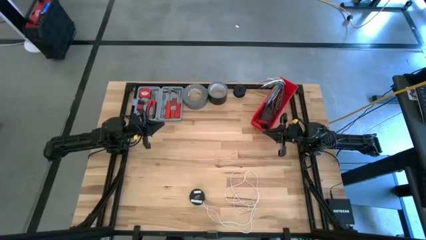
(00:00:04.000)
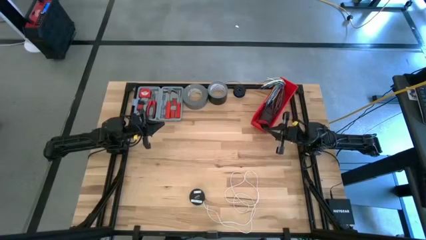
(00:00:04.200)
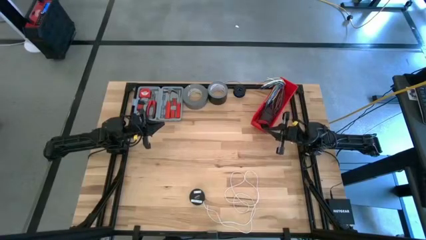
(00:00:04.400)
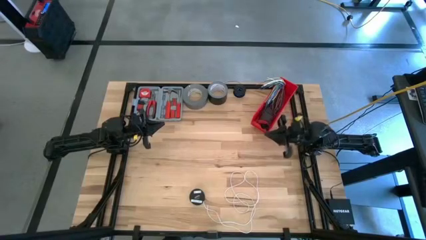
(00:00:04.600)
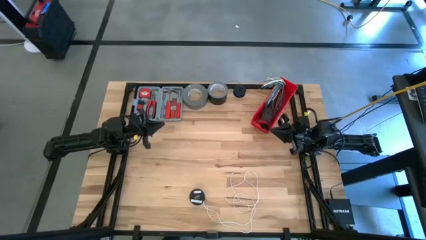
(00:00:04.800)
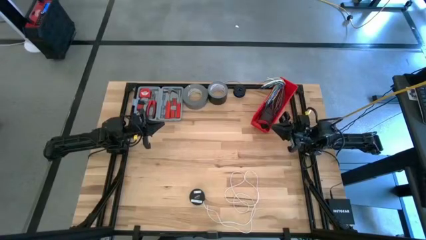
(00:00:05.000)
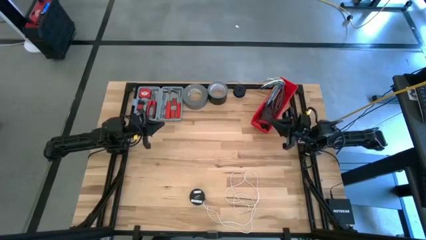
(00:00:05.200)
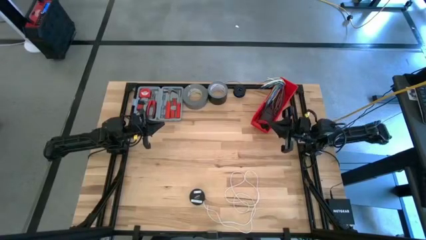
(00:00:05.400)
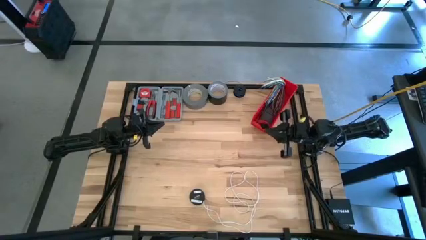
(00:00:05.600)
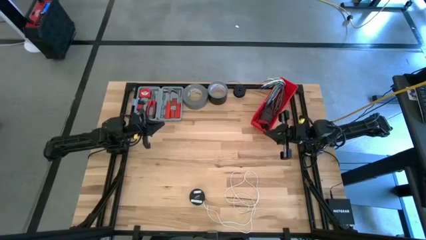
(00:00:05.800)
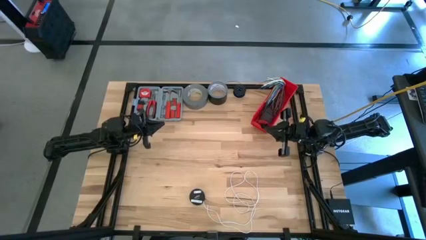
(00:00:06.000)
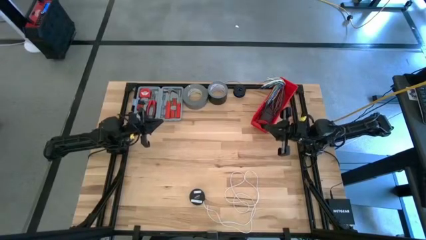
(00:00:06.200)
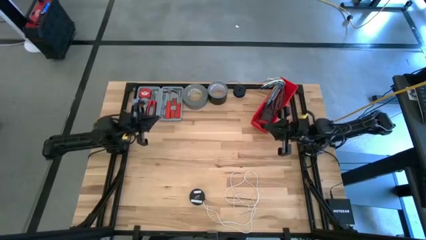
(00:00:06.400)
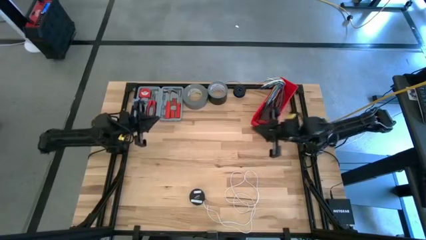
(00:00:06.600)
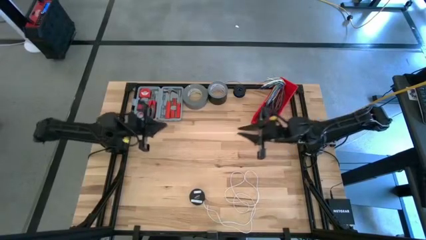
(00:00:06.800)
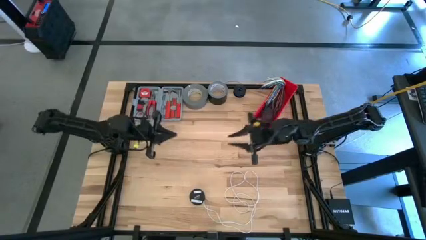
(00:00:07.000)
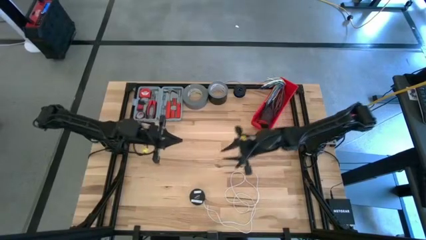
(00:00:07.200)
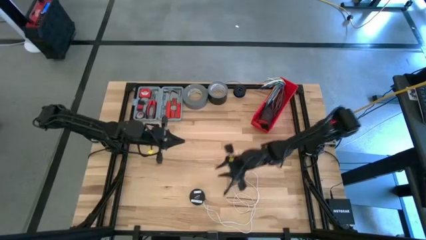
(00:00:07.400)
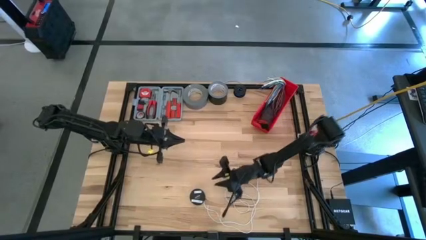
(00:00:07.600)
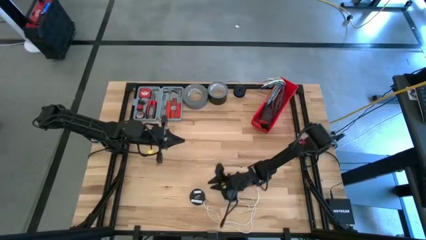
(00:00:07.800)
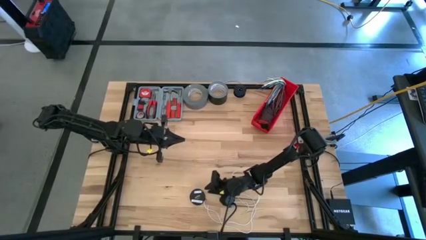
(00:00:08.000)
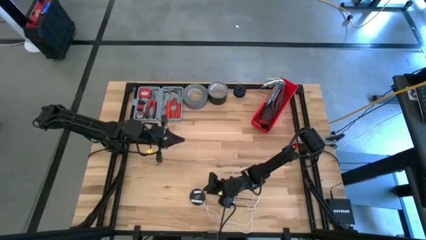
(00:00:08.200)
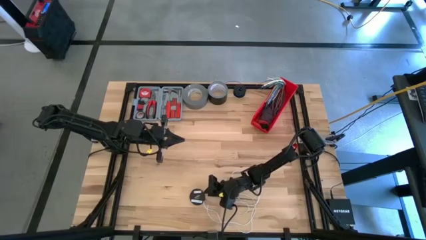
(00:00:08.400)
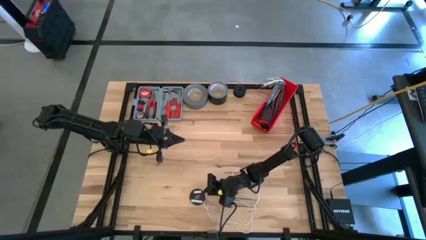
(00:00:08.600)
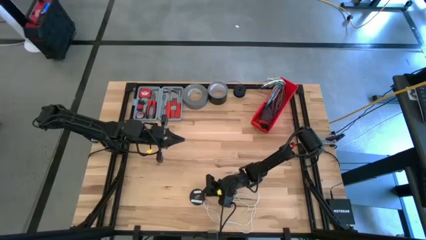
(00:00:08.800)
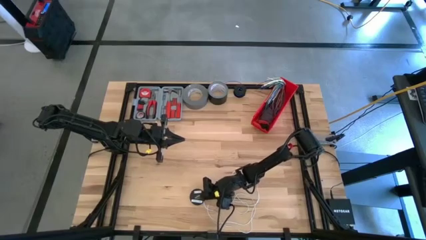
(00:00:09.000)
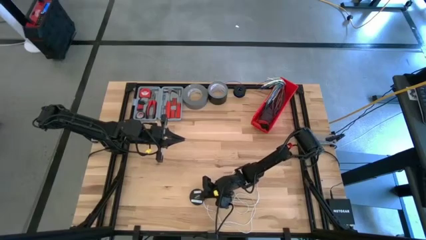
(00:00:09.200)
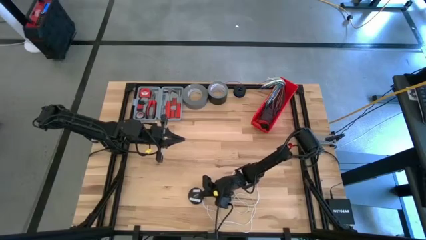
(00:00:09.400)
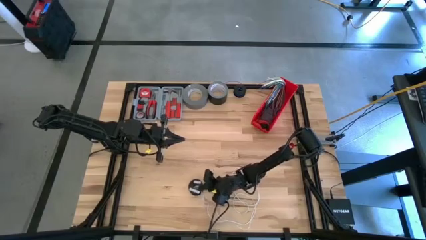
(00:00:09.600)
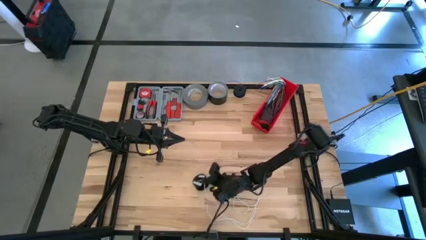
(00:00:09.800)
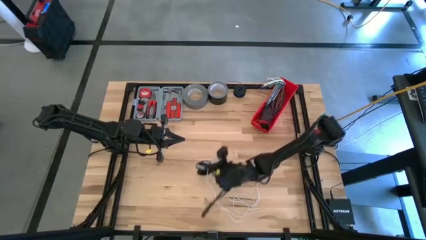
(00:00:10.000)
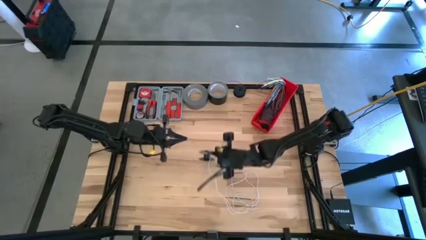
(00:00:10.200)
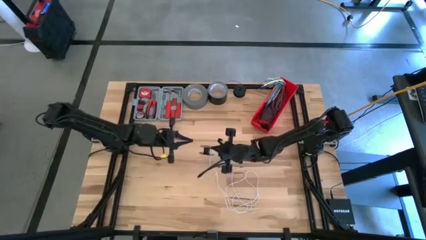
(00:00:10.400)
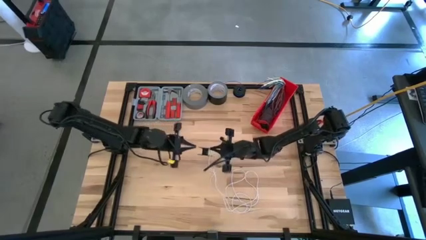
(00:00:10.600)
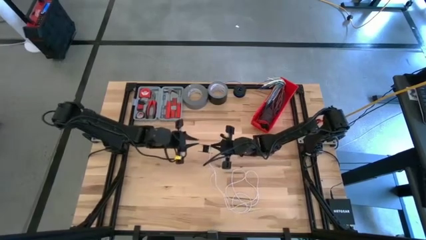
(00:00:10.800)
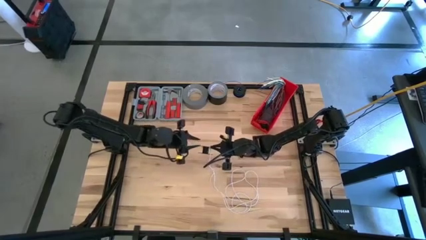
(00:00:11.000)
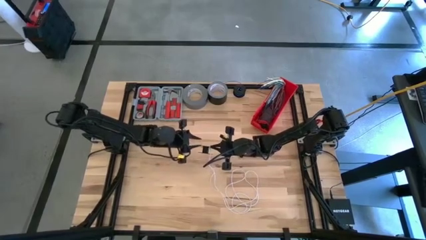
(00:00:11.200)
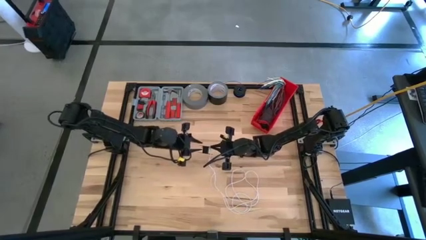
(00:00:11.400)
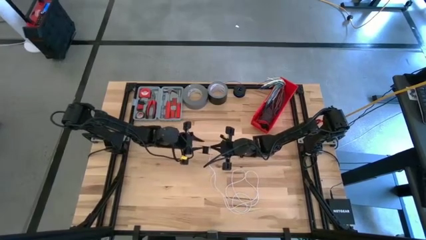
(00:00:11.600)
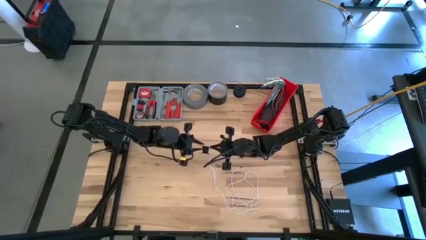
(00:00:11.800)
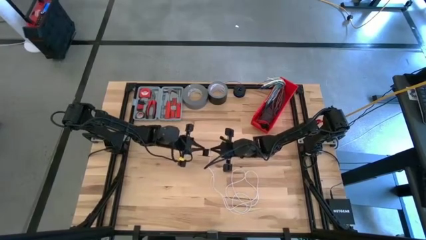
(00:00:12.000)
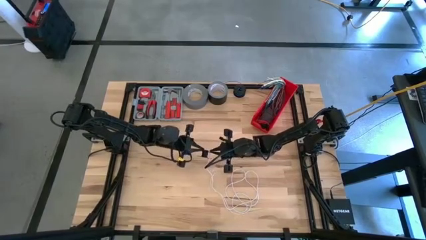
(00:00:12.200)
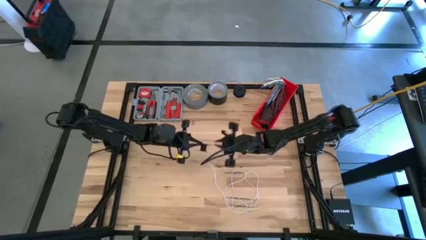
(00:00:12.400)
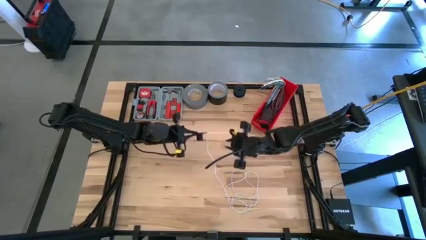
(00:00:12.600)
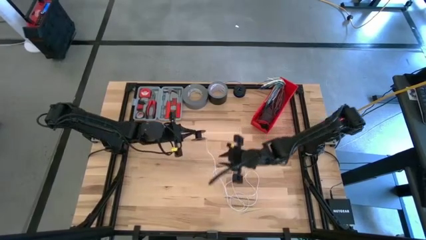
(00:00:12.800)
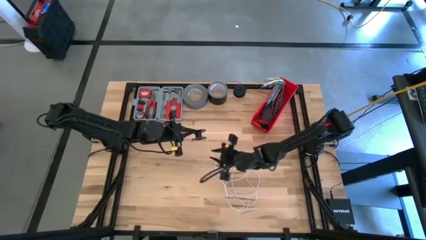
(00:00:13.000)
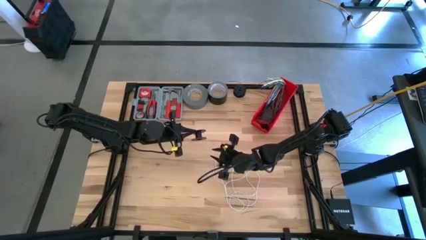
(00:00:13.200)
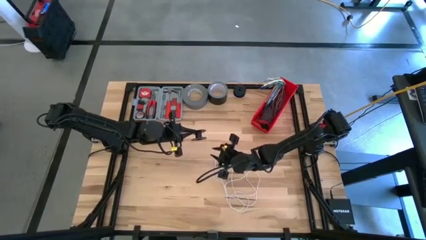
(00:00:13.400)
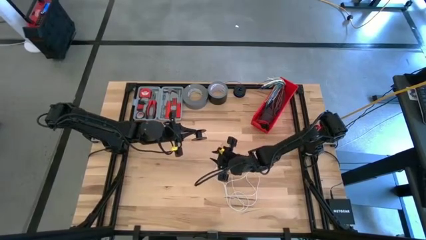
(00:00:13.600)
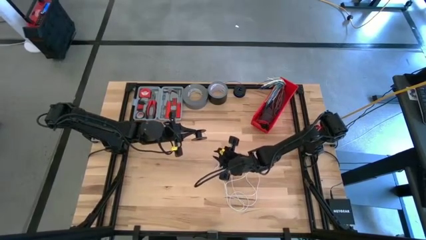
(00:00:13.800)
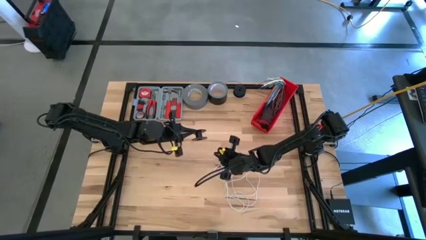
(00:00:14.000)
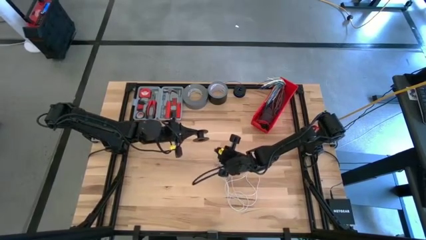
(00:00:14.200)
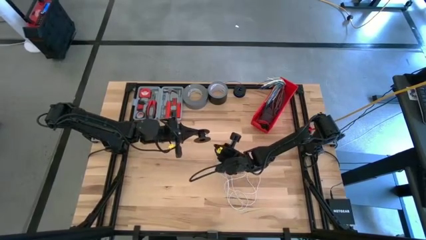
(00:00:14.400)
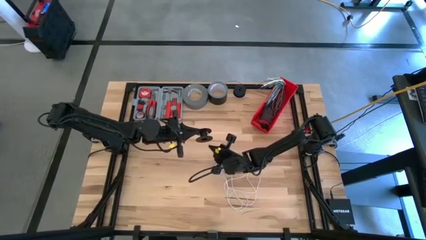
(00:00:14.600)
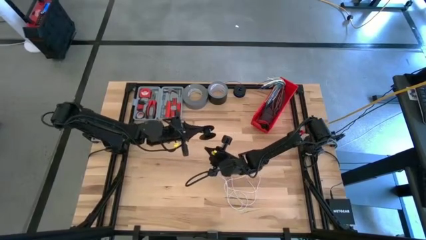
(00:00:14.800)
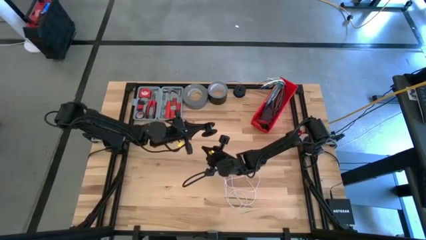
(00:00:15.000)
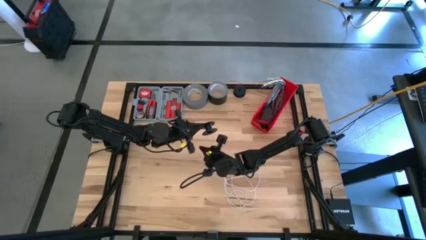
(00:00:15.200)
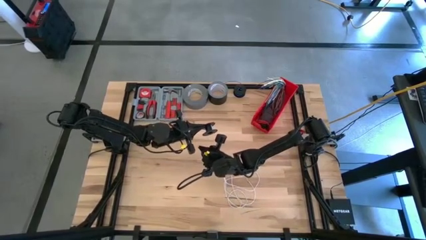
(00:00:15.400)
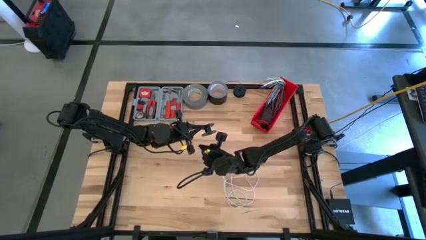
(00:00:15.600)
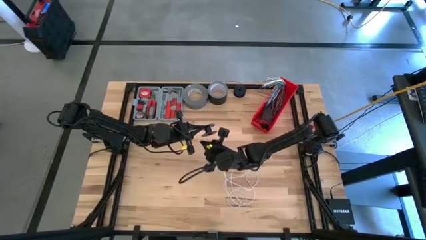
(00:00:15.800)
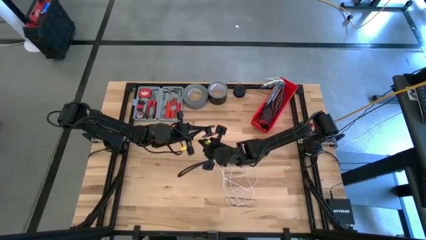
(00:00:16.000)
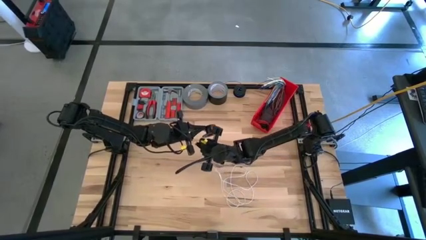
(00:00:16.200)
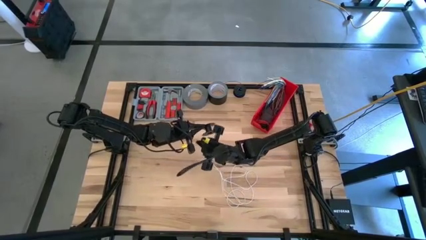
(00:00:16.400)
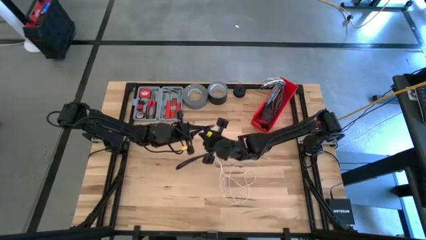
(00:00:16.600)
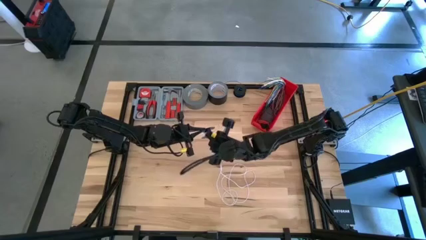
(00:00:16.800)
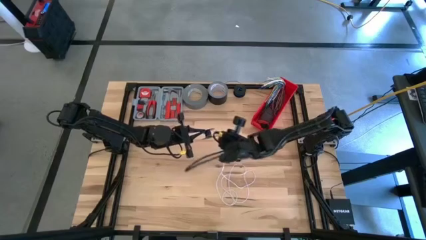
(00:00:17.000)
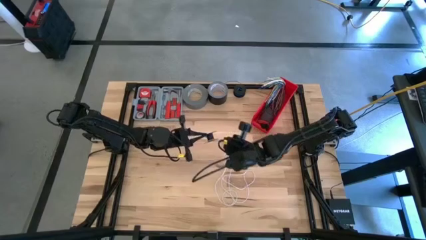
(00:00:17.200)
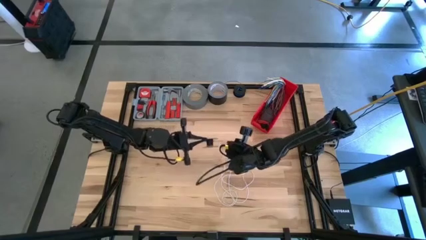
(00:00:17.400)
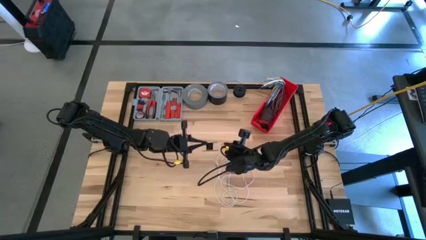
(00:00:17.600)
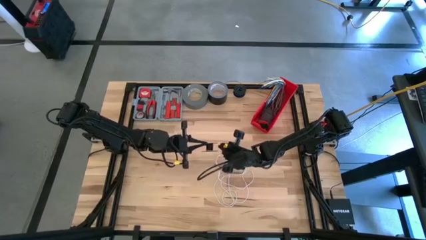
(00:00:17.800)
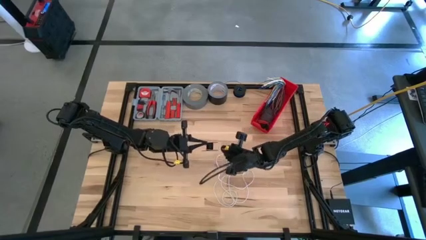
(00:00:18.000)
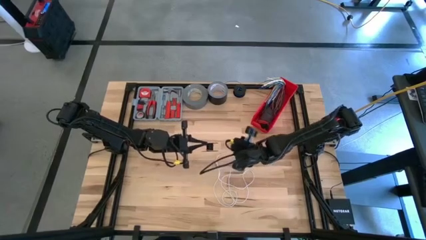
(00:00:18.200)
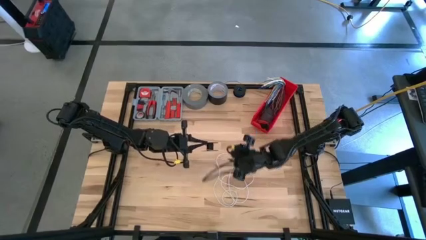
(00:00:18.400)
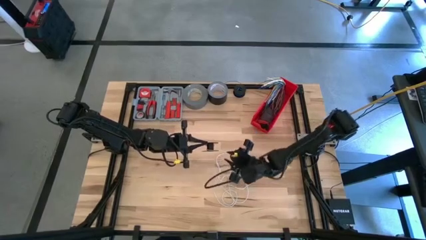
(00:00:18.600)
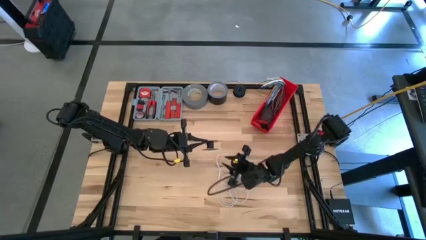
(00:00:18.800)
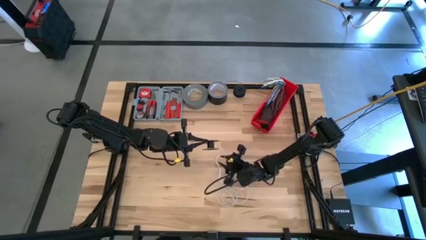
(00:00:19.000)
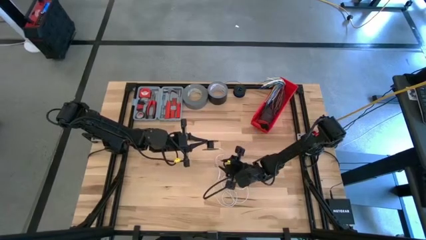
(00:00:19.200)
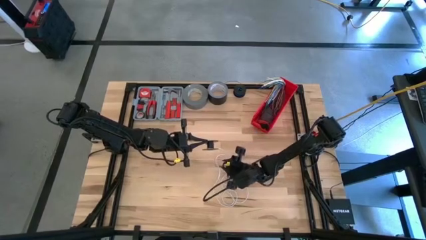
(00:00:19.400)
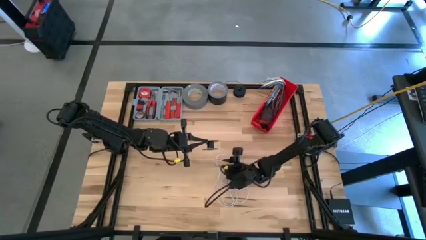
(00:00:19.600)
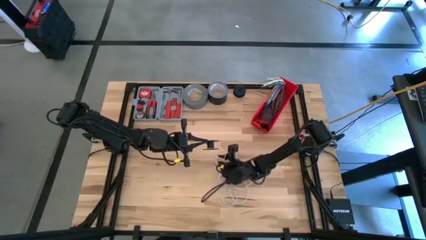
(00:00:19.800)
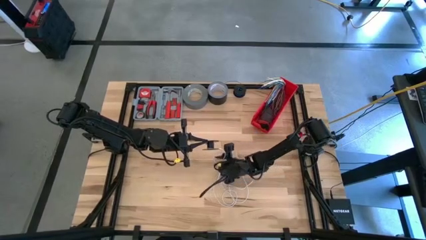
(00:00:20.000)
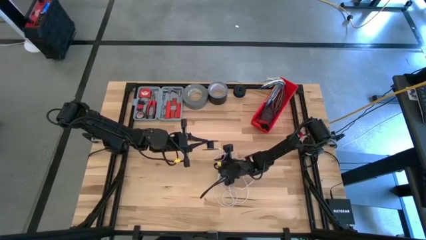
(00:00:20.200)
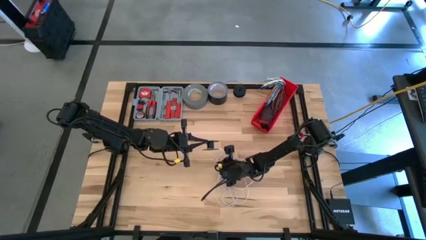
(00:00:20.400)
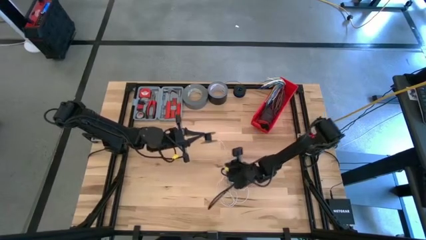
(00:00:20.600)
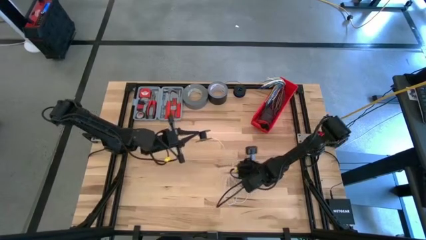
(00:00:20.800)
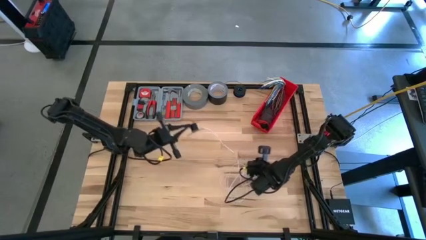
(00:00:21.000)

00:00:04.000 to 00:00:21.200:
Task: Coil cords
Coil the white wire onto the black spool
